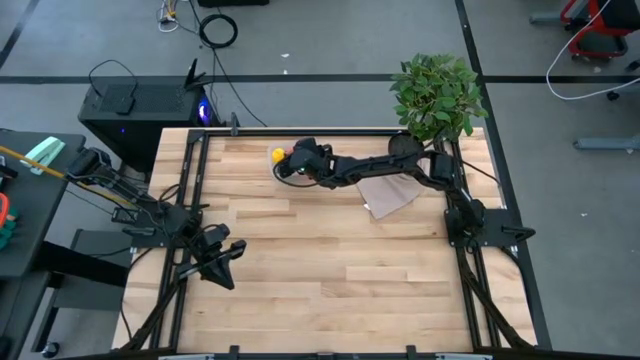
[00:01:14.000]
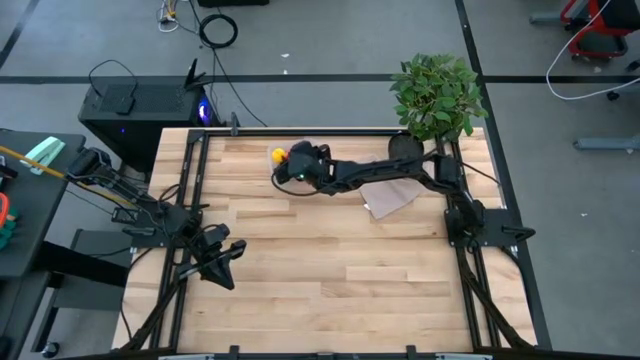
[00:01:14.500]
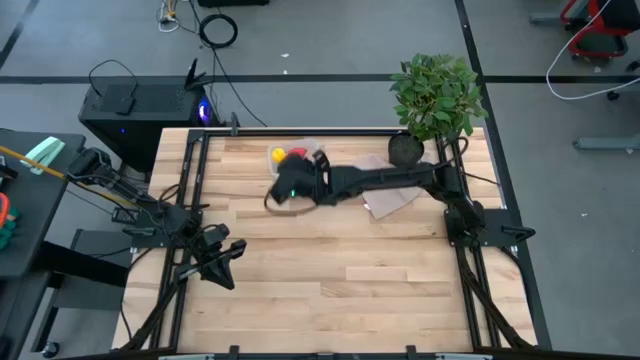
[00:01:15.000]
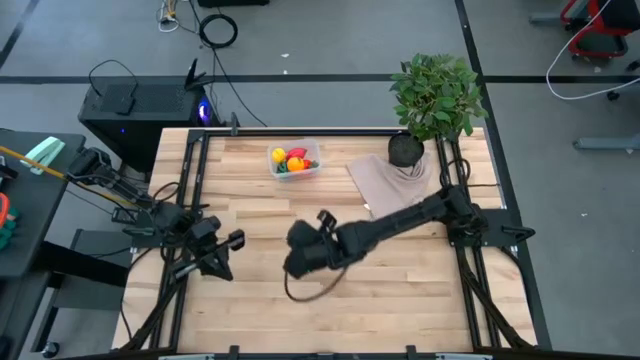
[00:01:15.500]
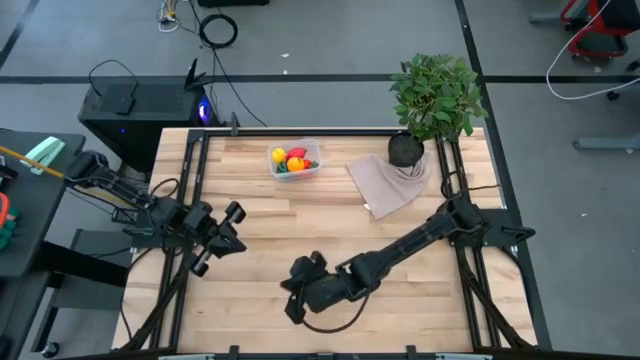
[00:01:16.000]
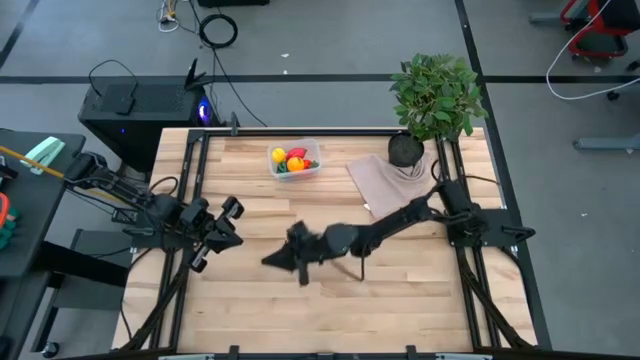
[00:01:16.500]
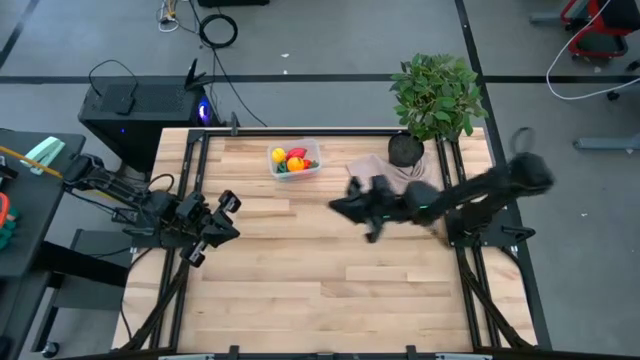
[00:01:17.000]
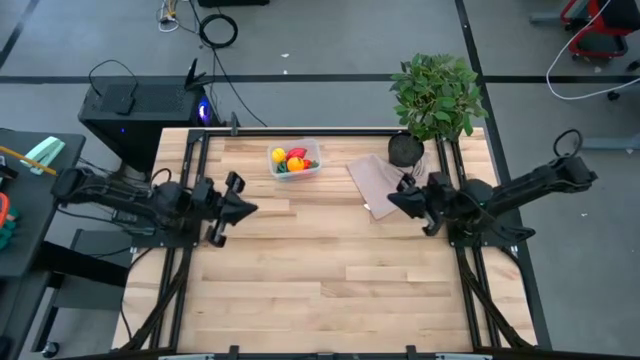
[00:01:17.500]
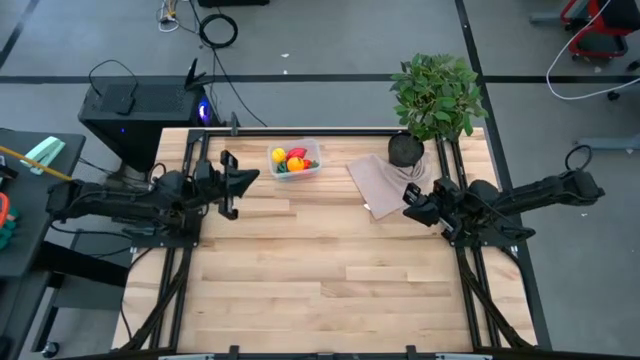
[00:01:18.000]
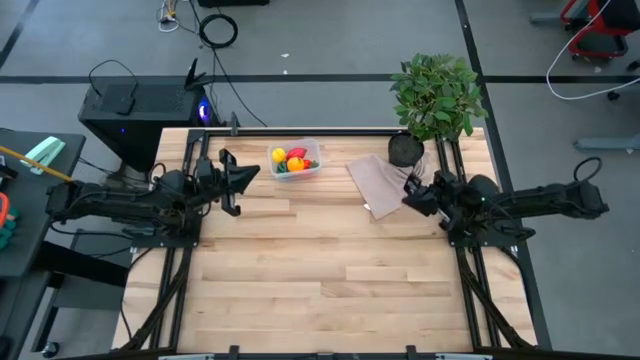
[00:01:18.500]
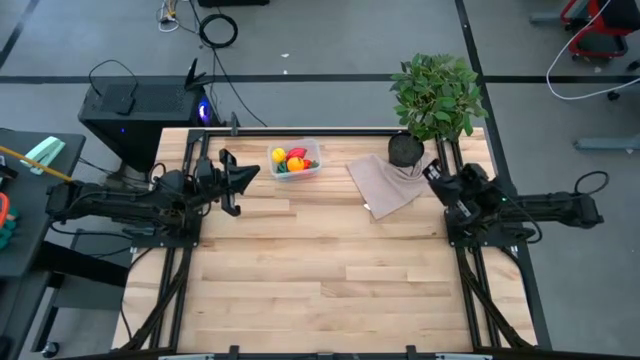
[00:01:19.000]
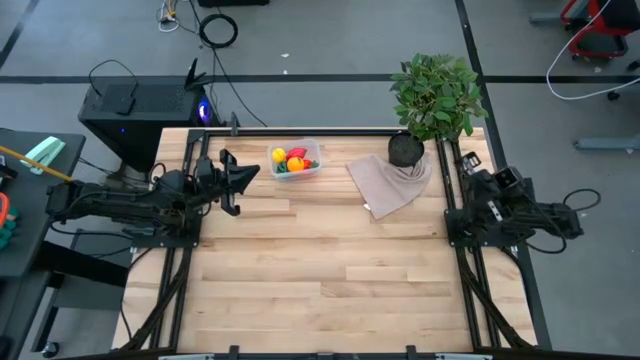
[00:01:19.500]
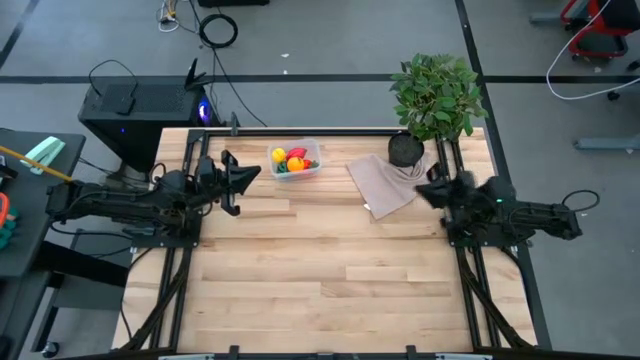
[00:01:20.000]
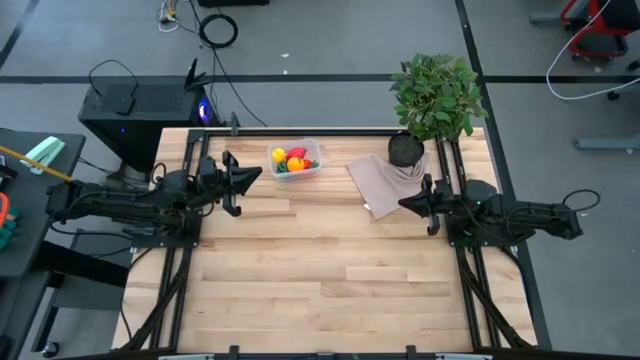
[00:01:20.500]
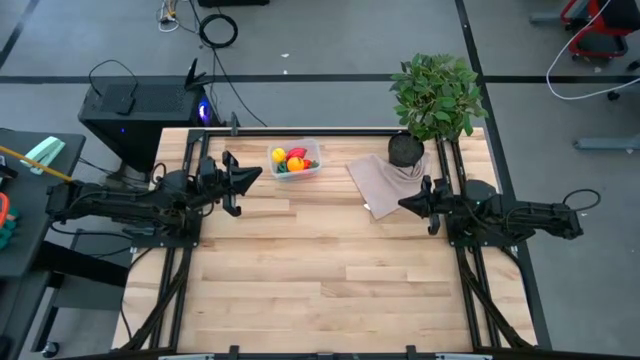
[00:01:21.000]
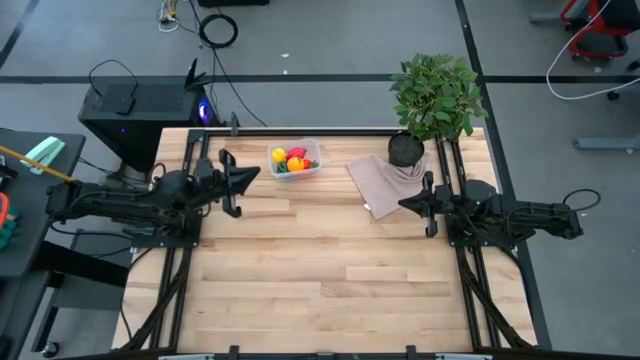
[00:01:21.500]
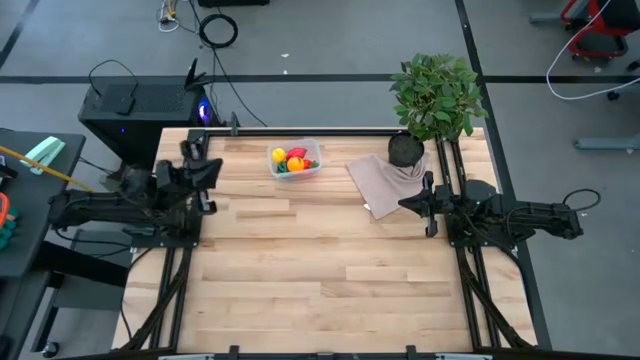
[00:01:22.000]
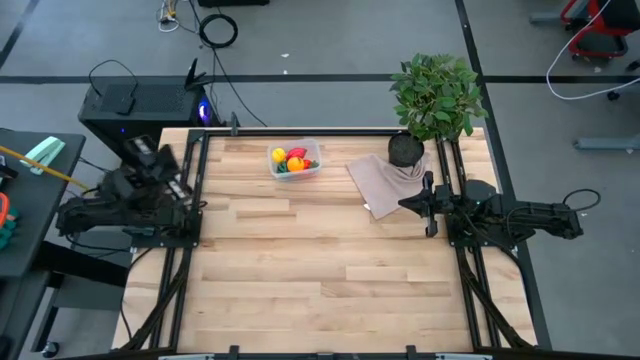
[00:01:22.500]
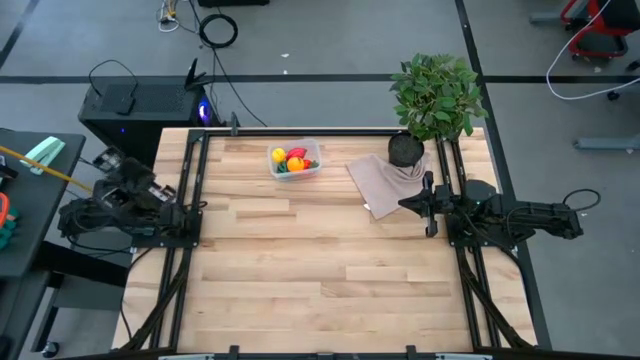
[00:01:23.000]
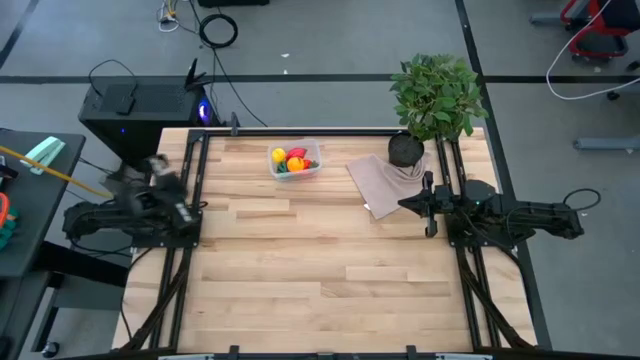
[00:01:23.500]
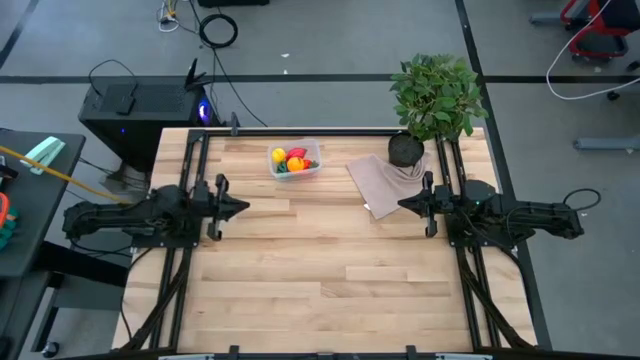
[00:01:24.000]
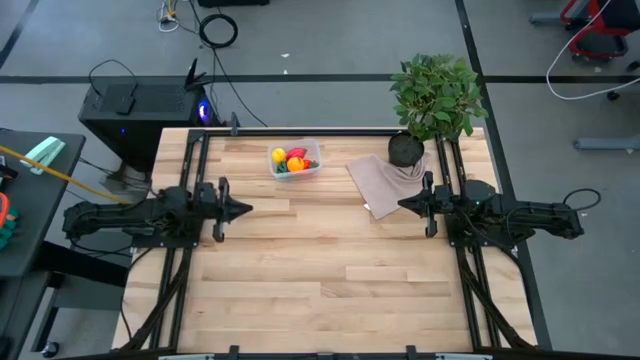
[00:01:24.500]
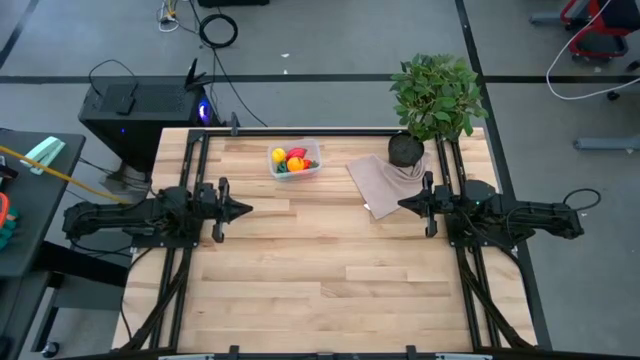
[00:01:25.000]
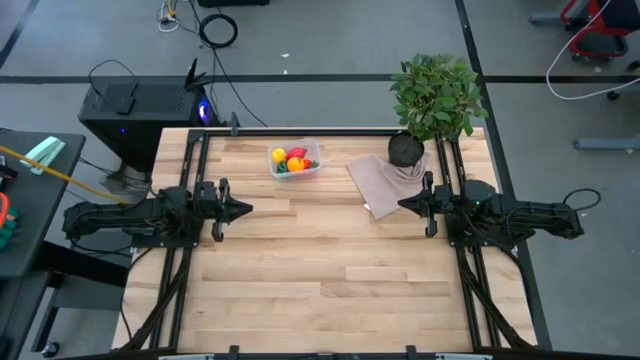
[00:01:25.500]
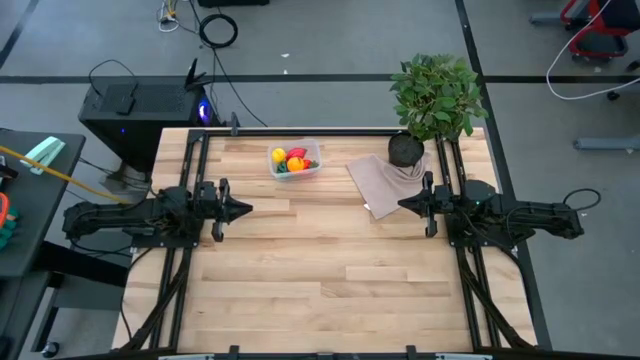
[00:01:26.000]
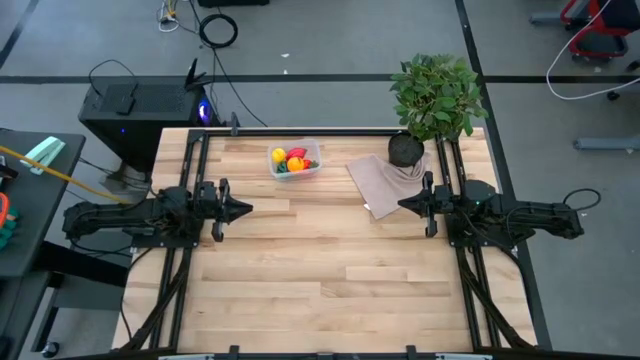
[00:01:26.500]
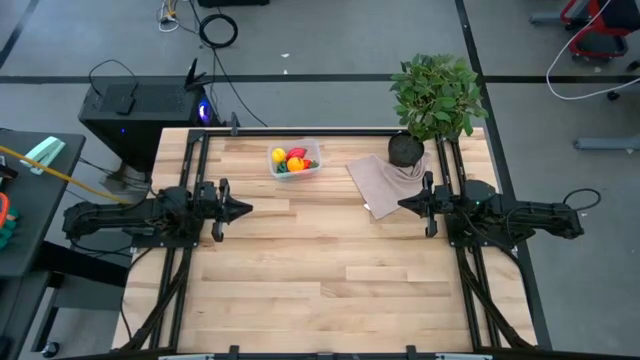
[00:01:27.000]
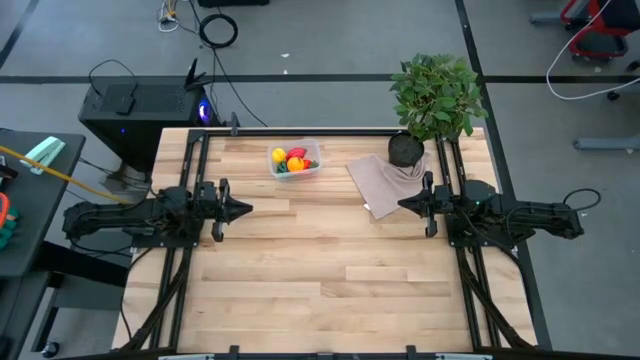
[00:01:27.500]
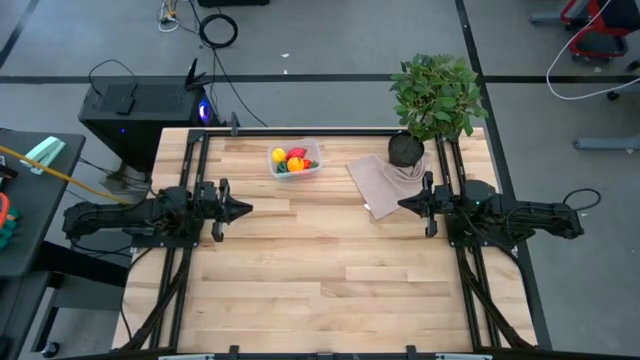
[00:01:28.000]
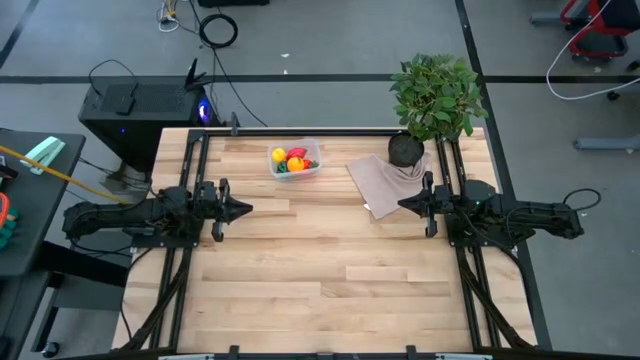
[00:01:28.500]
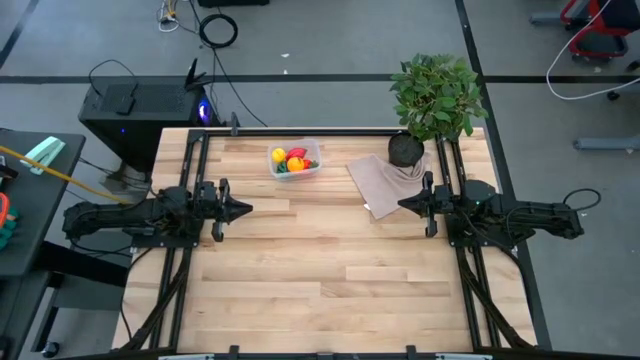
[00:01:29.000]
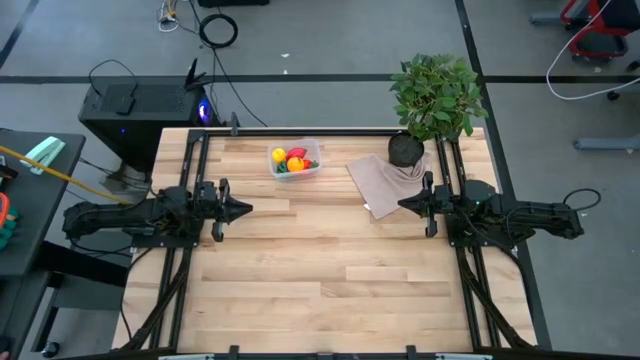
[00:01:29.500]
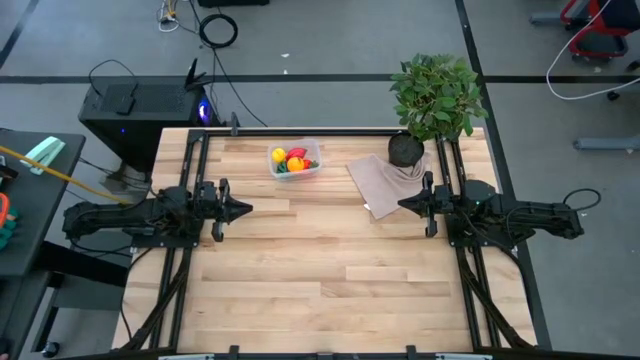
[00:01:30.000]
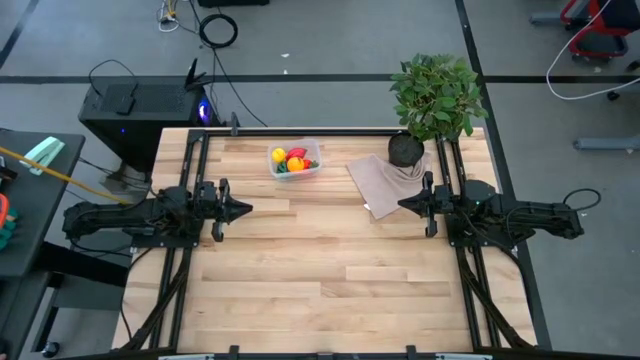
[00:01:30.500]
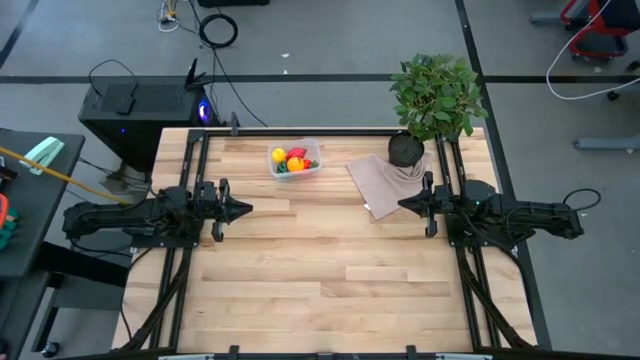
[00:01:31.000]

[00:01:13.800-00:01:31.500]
Task: Pick and placing Produce into tupperware
Return to Home Position

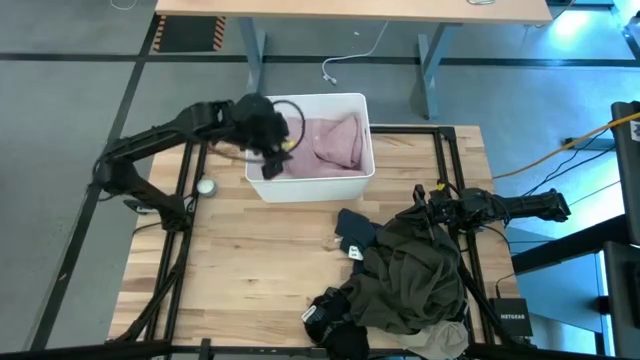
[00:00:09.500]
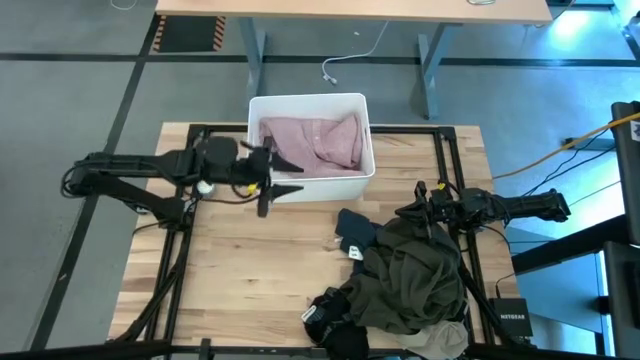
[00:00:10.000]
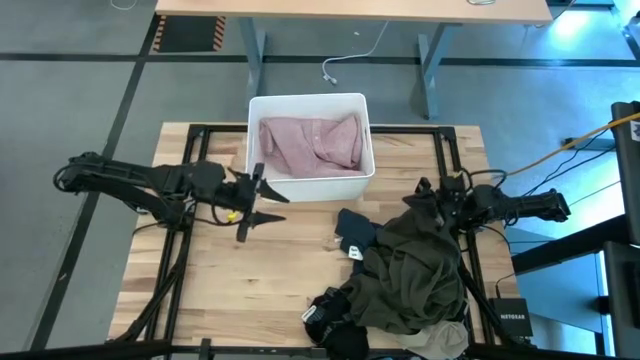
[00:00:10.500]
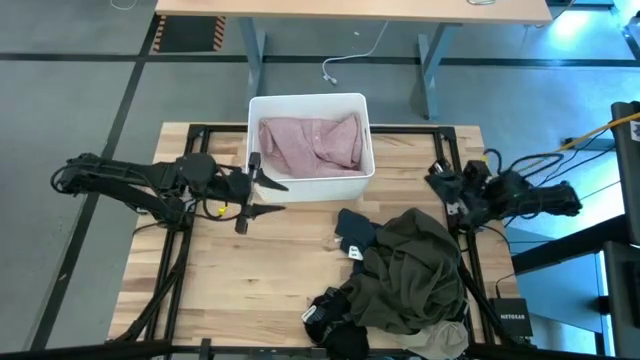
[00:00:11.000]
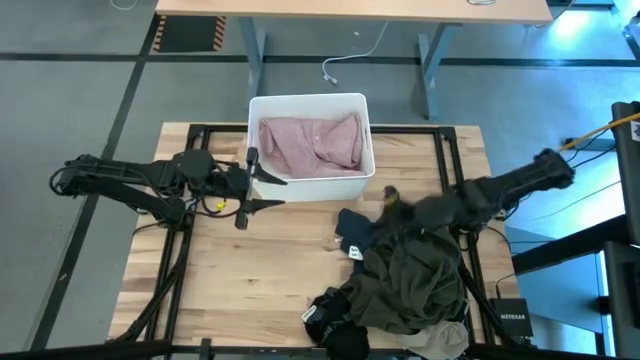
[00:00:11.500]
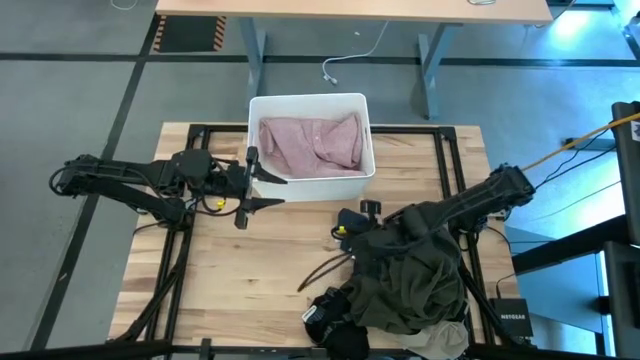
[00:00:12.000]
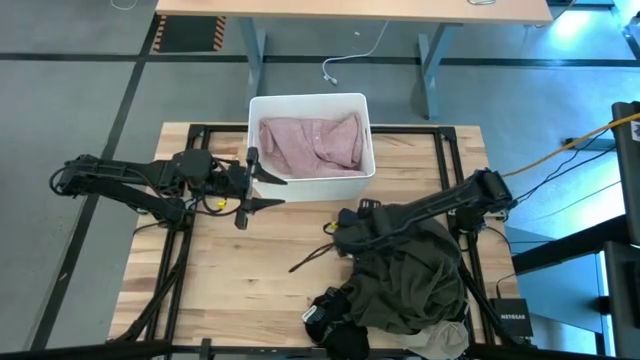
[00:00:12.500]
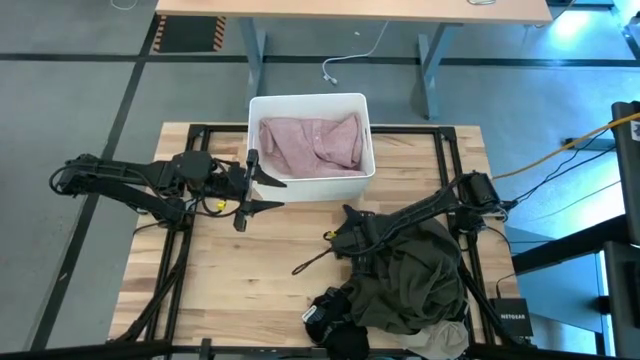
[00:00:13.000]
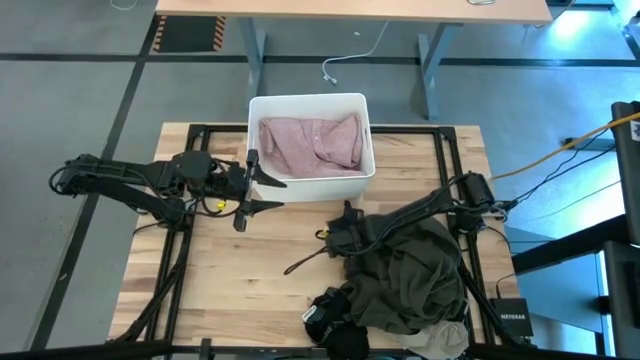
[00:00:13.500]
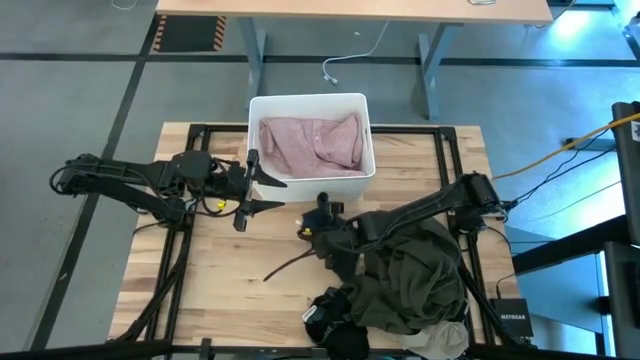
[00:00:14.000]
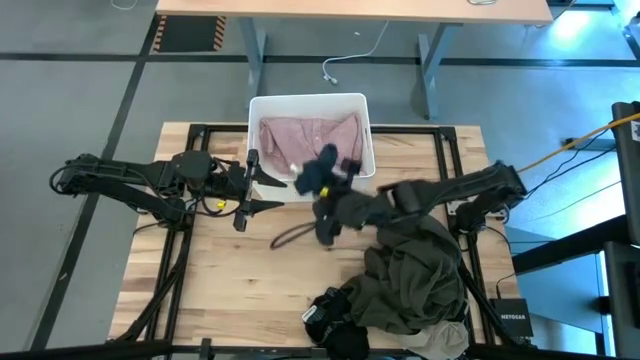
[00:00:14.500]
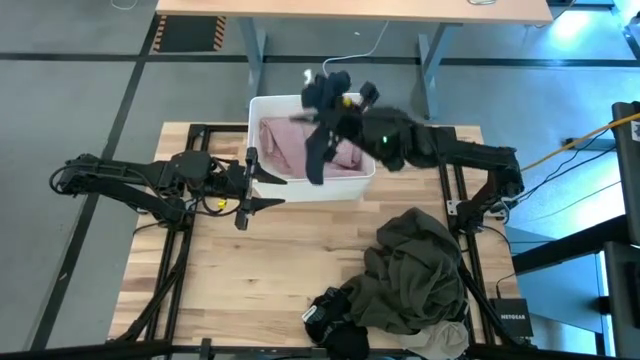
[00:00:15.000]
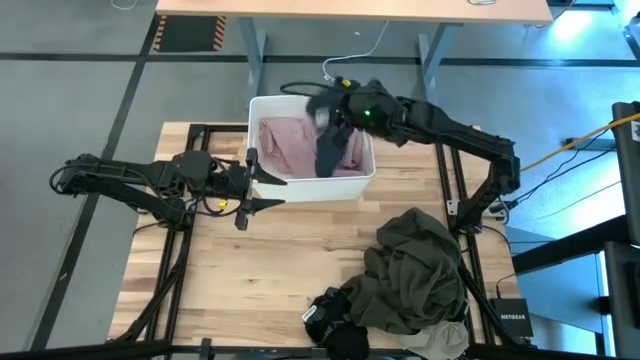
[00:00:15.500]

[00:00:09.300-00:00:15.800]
Task: Sort clothes
Put the blue pants into the white laundry bin
